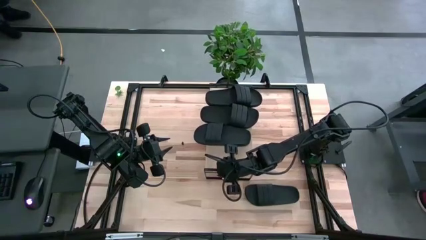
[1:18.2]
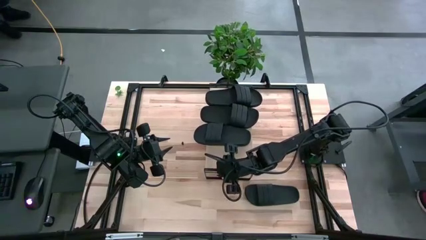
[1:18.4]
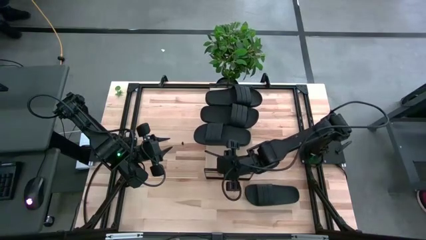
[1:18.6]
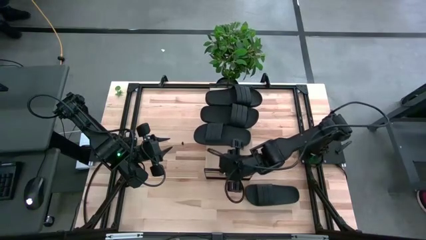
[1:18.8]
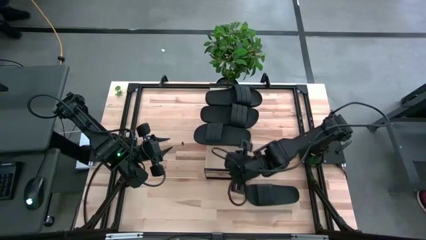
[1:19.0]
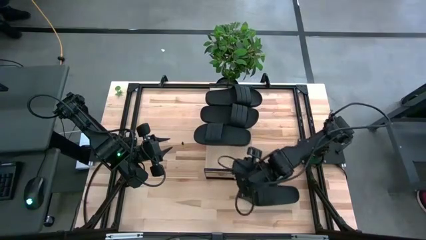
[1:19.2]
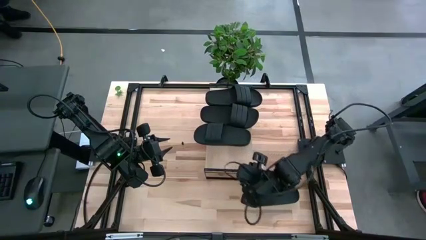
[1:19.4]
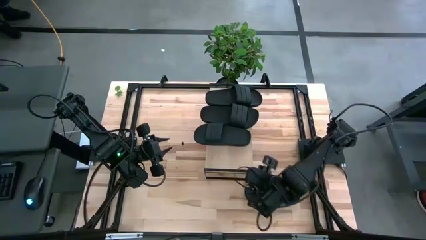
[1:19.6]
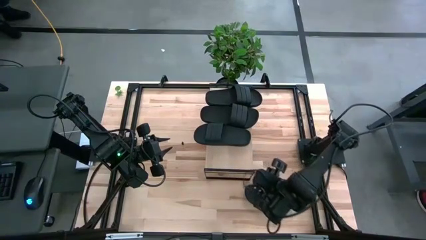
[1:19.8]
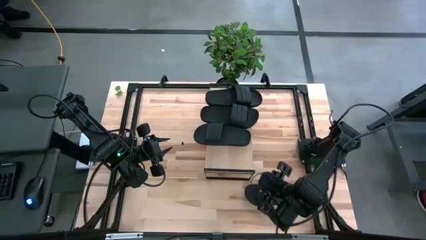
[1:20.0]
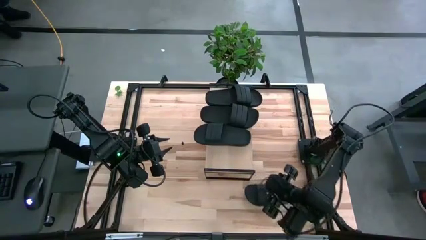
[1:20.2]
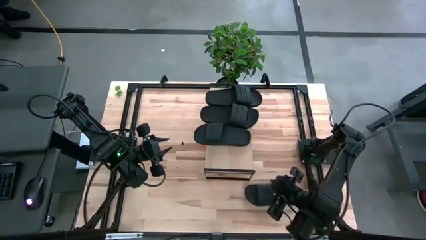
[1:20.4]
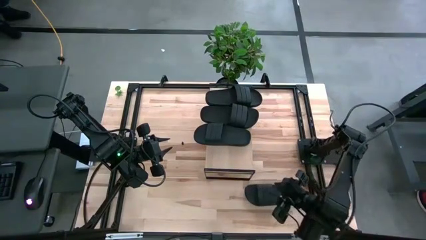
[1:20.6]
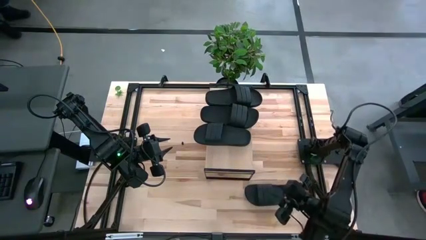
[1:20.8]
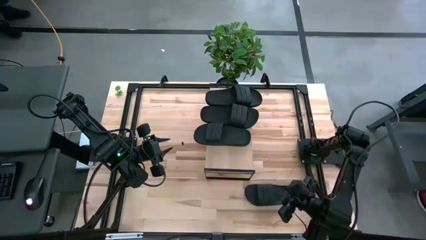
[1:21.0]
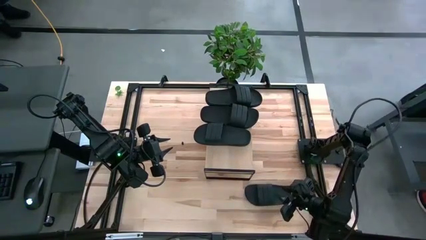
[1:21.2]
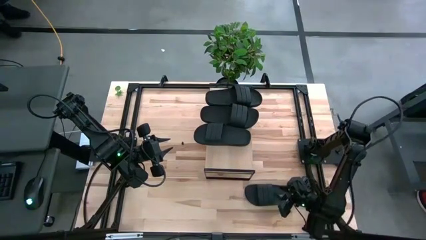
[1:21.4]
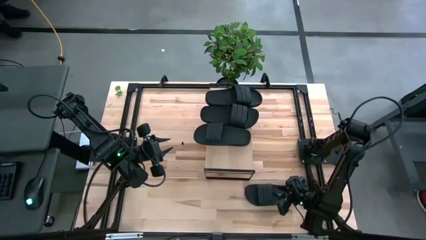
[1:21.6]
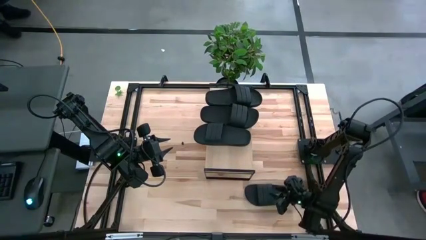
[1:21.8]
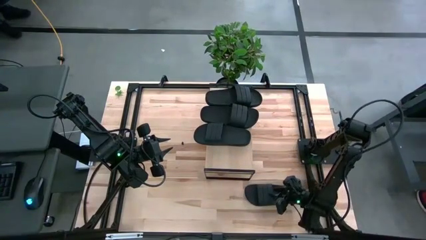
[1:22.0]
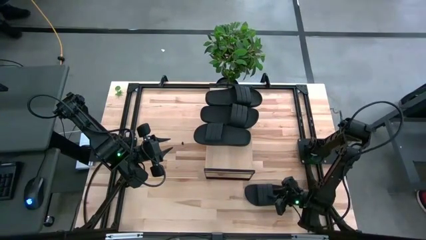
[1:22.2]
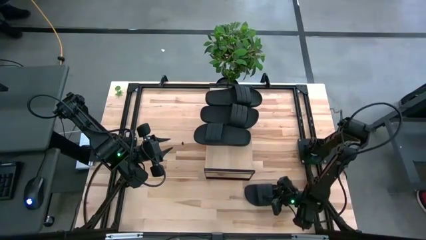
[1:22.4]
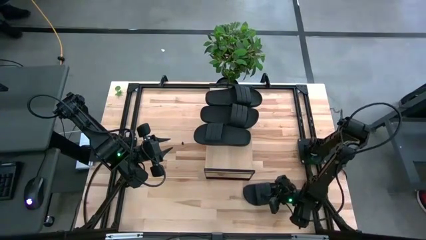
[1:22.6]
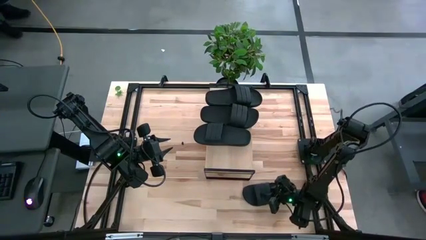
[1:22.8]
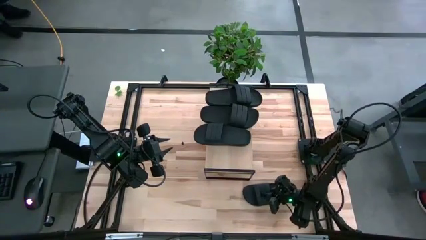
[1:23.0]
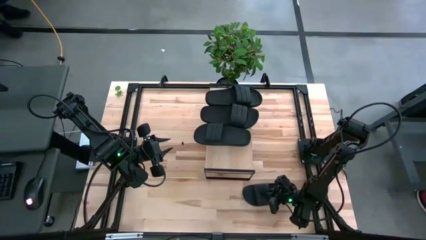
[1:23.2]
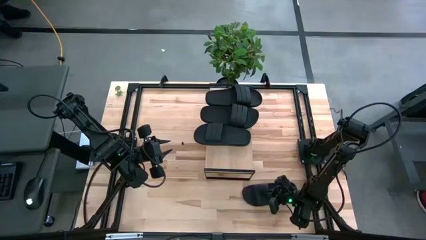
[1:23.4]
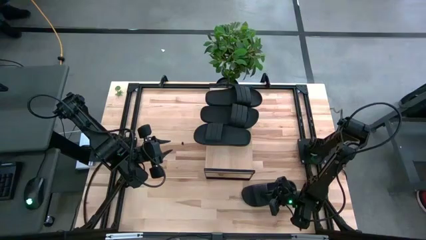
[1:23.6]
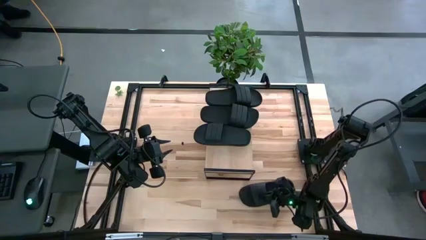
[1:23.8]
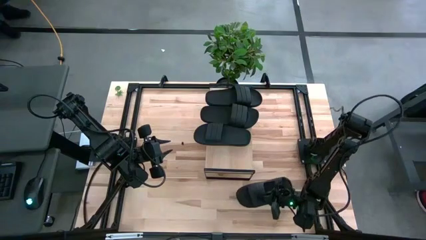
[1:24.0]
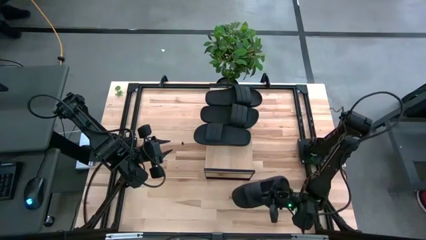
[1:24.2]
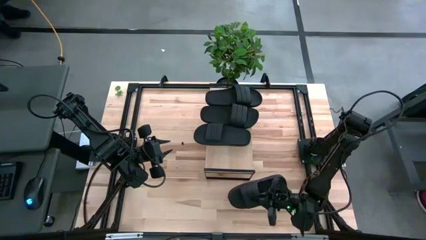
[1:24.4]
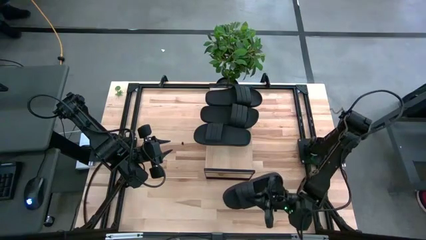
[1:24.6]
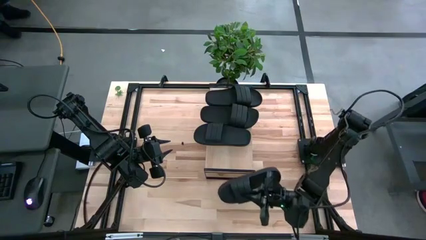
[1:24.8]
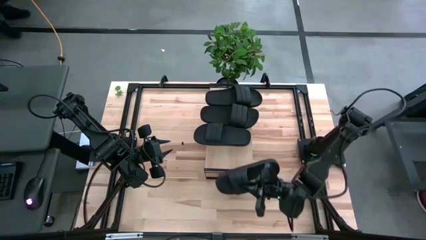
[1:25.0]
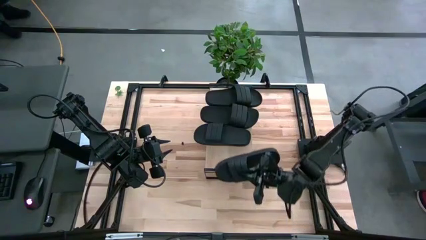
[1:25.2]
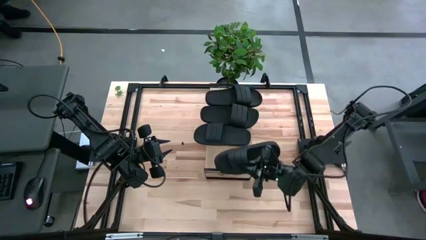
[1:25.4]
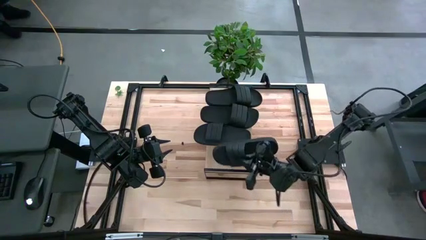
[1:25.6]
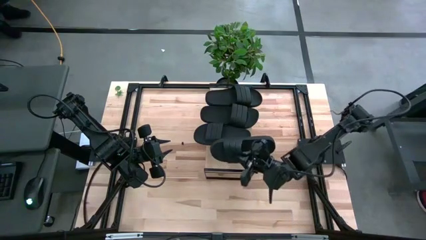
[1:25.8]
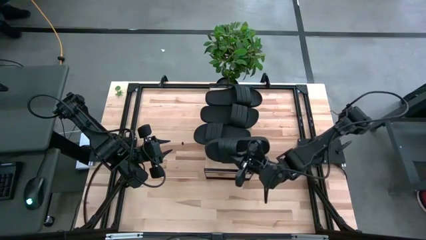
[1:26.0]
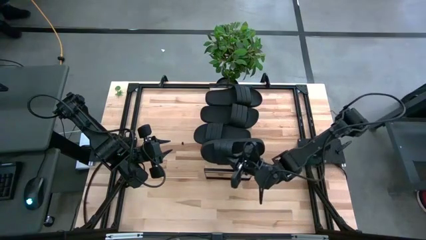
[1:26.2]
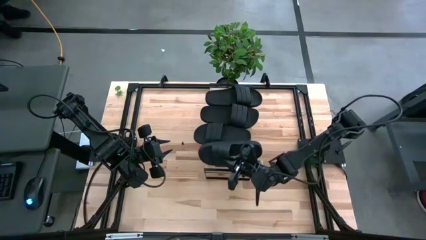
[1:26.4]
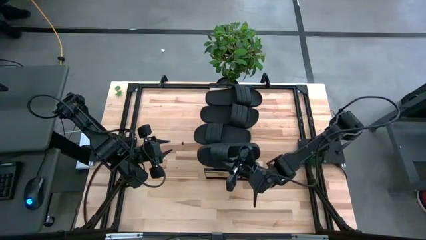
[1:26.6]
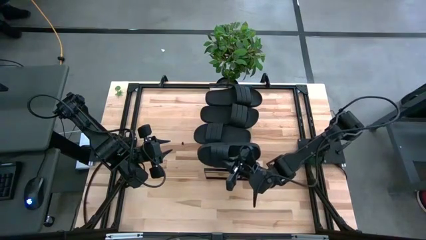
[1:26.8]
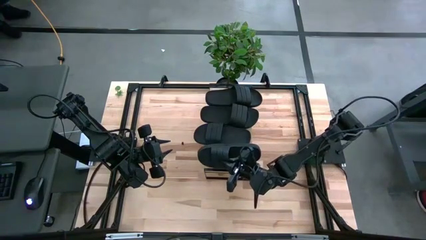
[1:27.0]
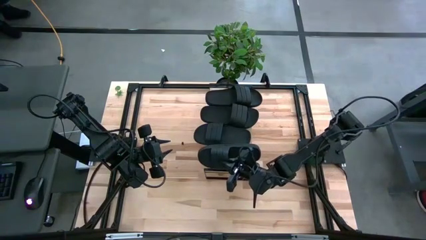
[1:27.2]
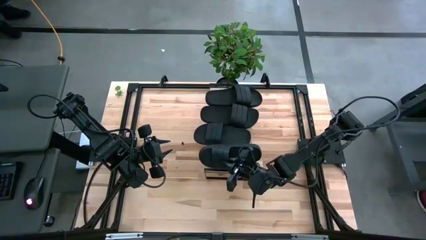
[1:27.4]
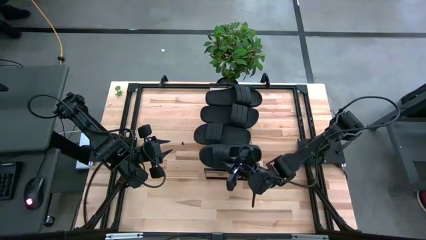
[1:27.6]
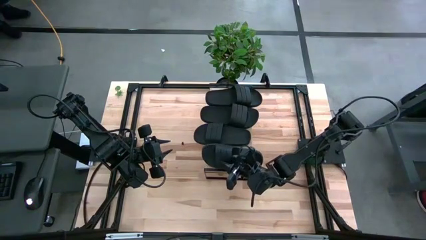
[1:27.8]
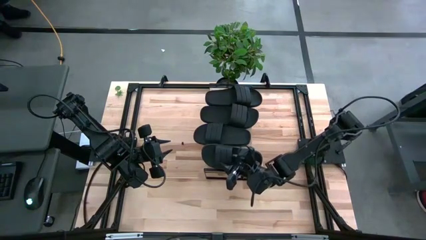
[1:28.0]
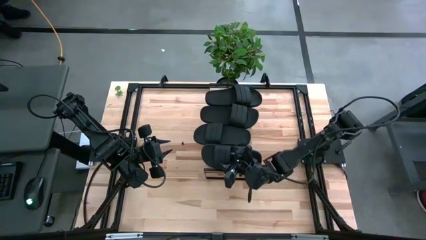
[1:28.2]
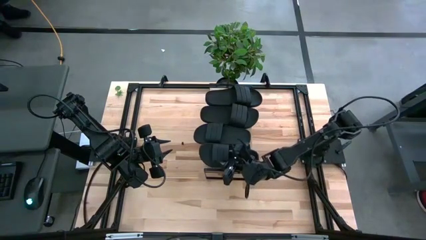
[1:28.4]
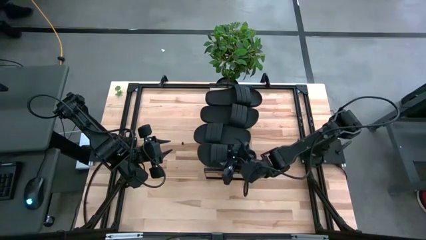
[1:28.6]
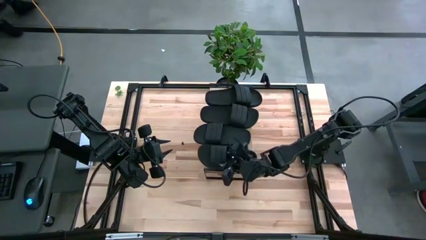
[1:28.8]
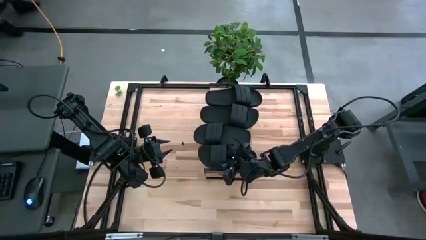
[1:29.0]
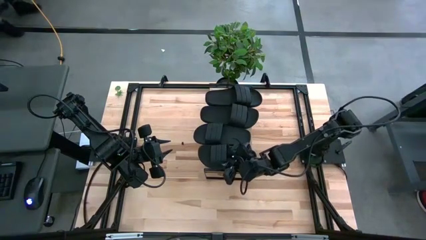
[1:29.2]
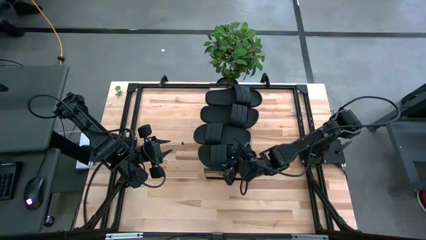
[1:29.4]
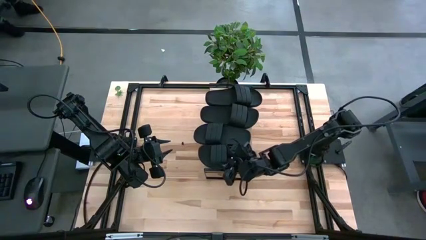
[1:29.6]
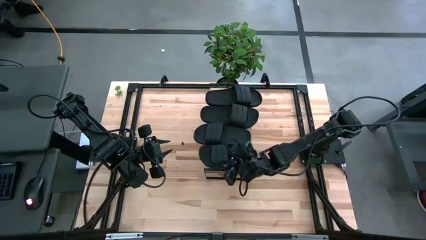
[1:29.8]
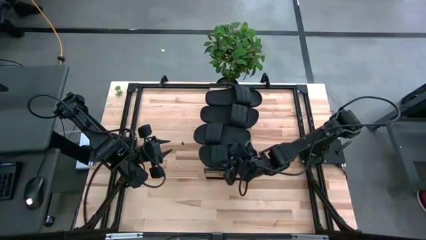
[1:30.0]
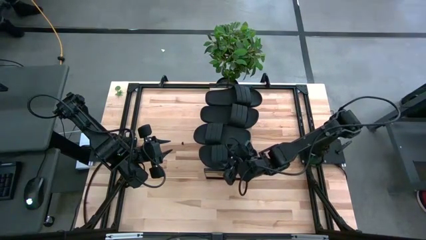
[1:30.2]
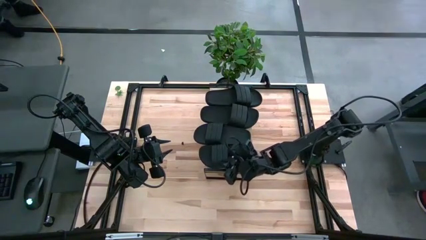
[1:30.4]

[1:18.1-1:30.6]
Task: Pick and place slides into the shelf
Put the slide on the shelf
